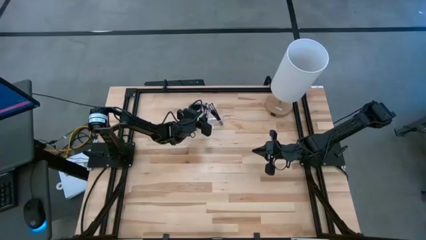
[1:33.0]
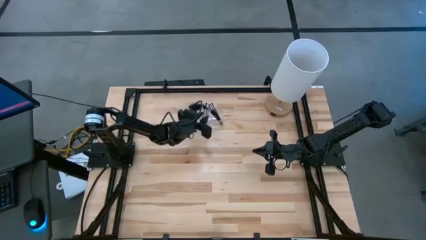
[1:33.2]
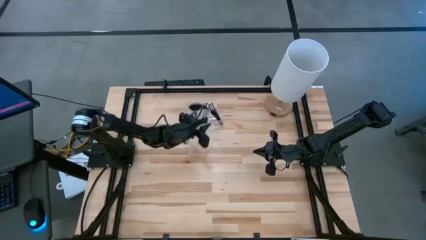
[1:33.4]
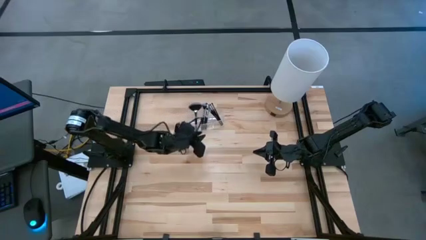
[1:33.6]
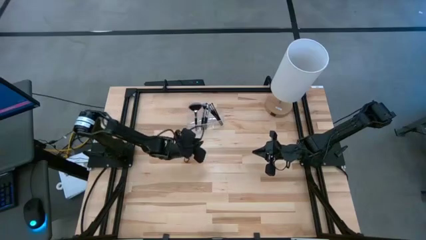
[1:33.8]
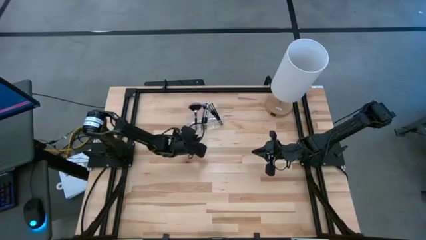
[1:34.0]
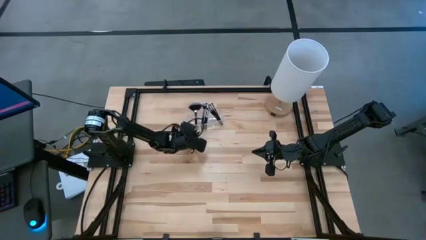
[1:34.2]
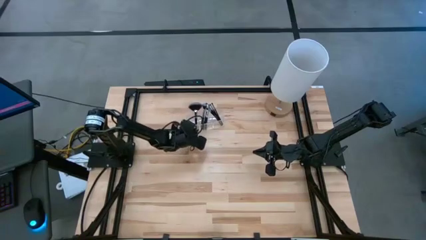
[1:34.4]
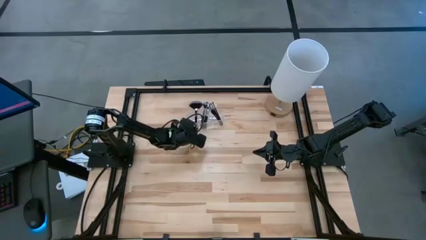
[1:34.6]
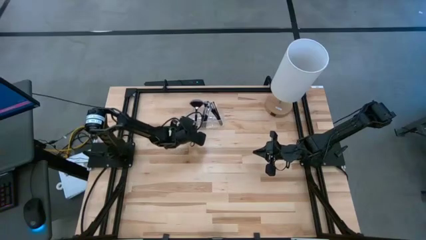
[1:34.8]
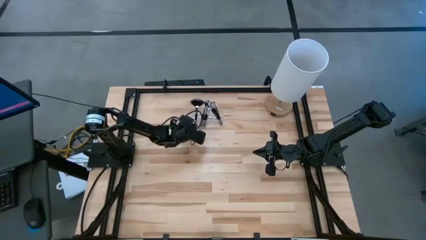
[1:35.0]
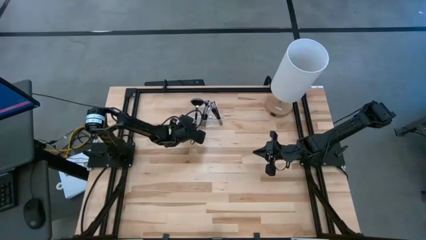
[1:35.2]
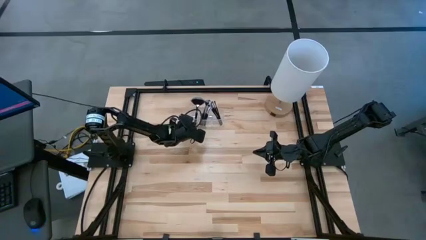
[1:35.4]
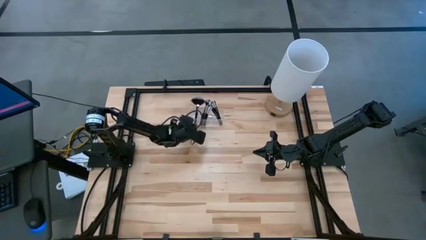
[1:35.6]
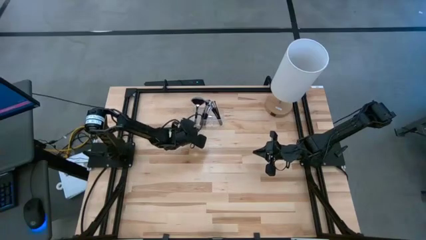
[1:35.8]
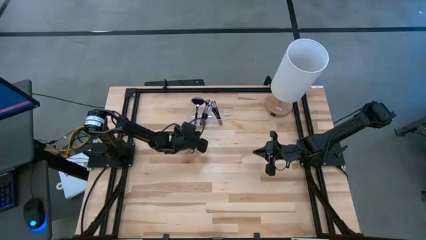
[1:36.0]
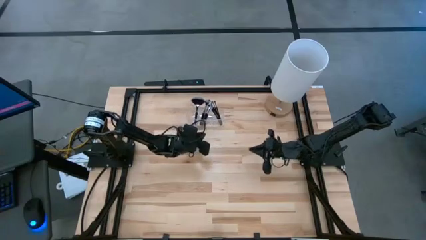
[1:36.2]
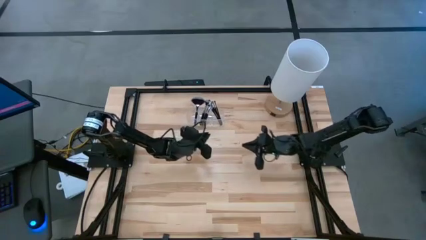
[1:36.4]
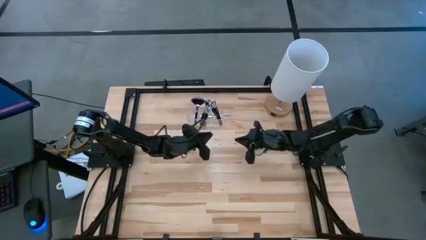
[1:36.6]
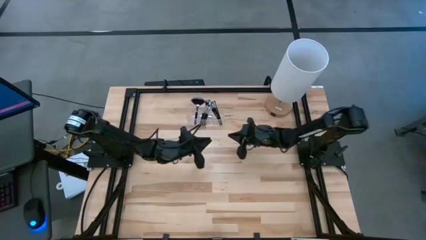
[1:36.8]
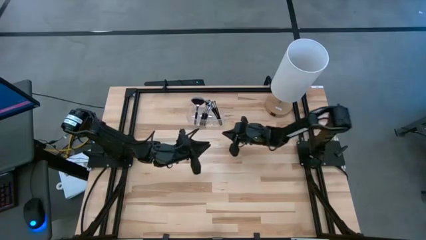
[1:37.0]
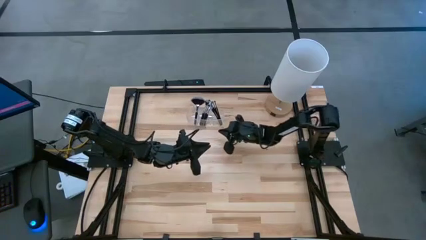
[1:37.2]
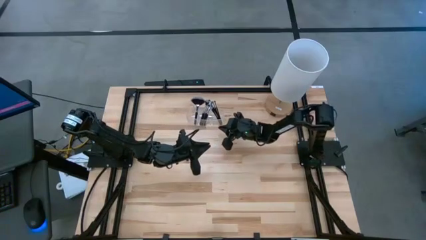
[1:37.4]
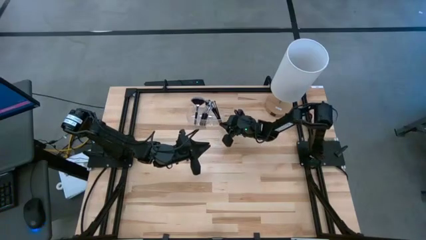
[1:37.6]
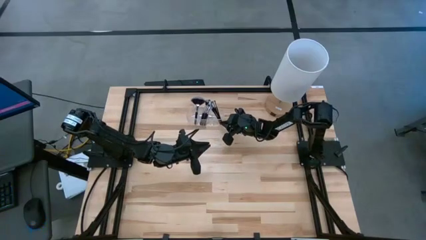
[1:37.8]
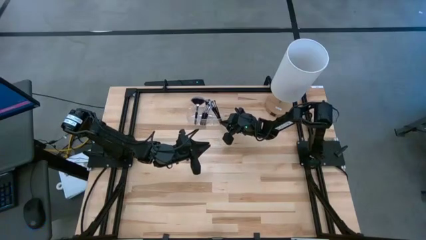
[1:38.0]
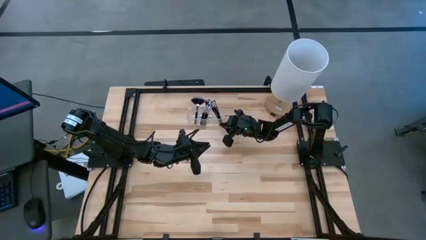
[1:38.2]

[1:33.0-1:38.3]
Task: Pick & Place Makeup Supplies
Adjust the transparent organizer

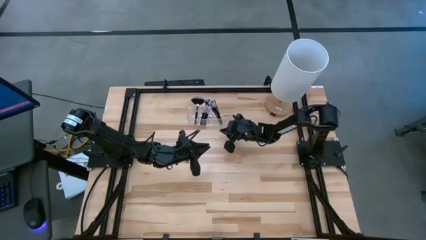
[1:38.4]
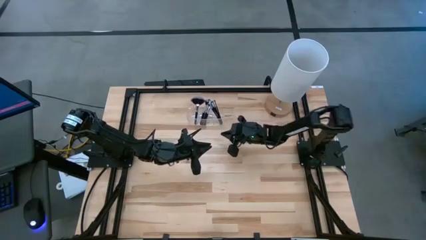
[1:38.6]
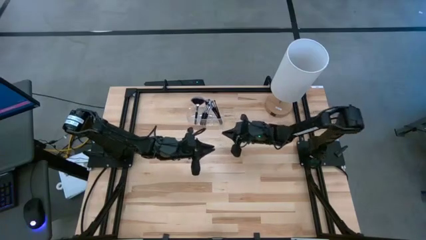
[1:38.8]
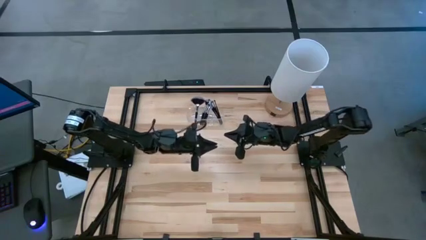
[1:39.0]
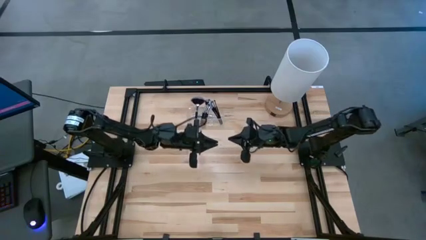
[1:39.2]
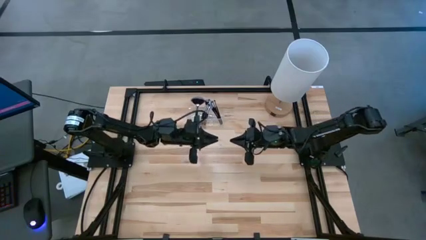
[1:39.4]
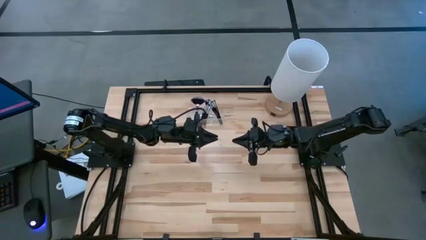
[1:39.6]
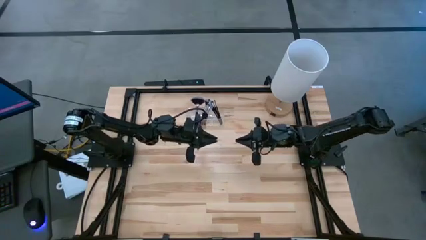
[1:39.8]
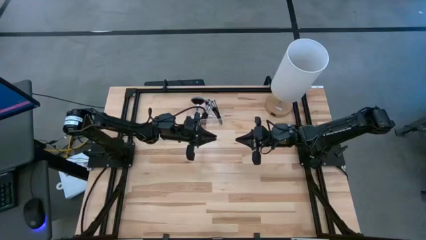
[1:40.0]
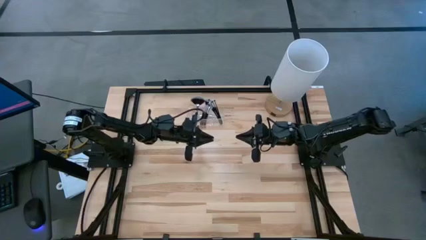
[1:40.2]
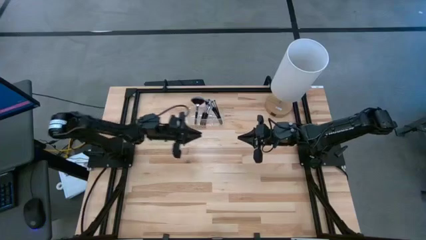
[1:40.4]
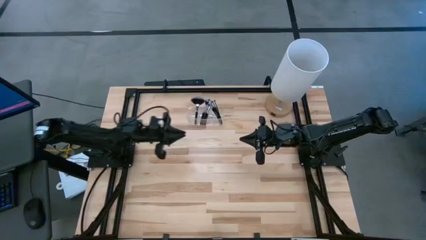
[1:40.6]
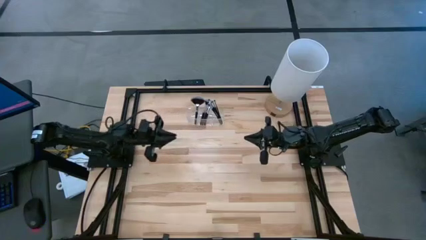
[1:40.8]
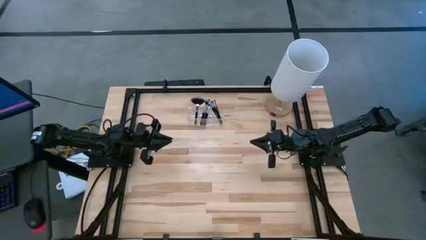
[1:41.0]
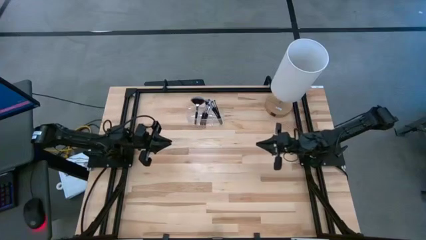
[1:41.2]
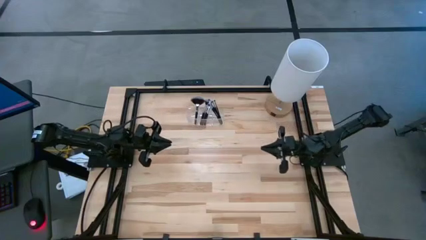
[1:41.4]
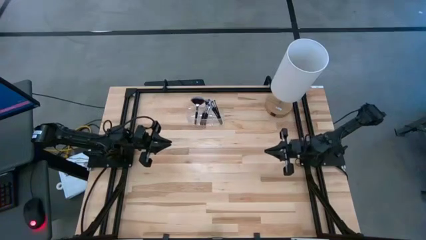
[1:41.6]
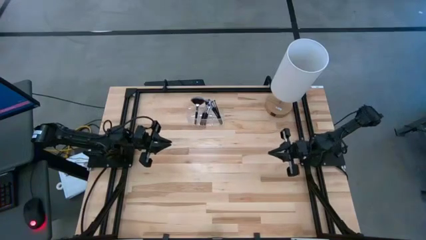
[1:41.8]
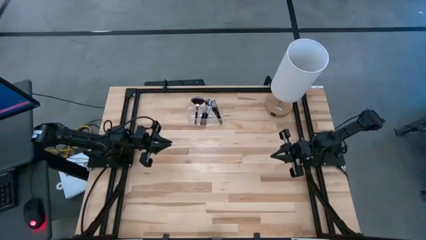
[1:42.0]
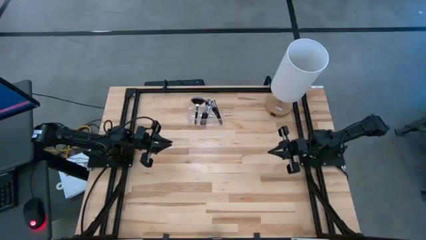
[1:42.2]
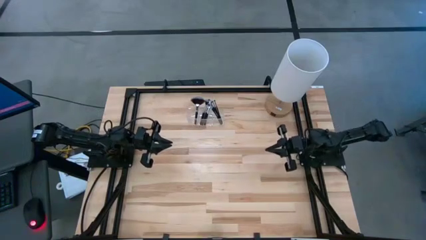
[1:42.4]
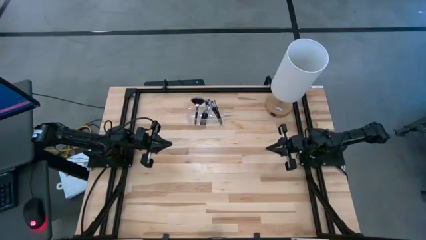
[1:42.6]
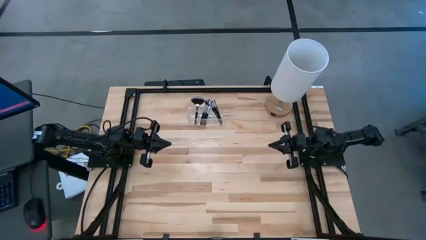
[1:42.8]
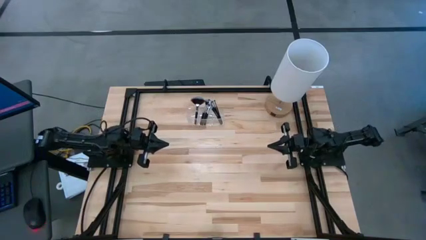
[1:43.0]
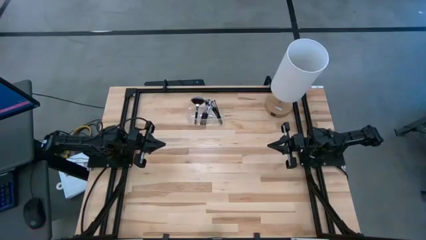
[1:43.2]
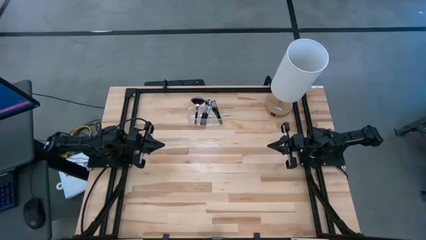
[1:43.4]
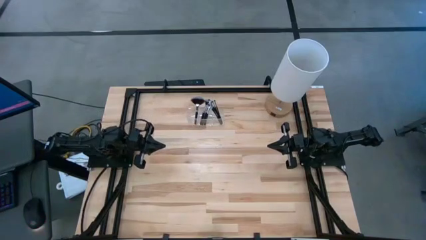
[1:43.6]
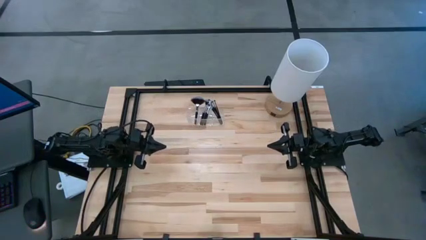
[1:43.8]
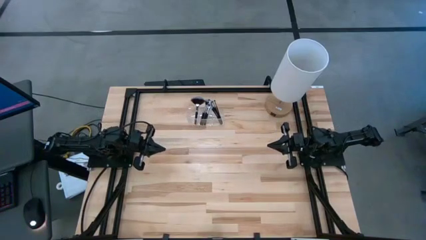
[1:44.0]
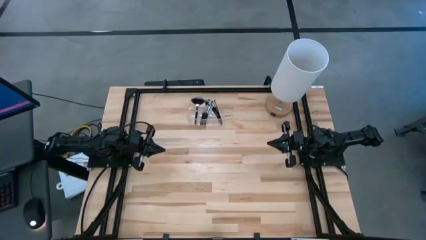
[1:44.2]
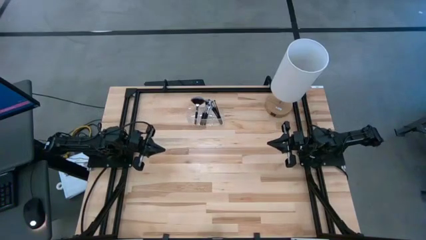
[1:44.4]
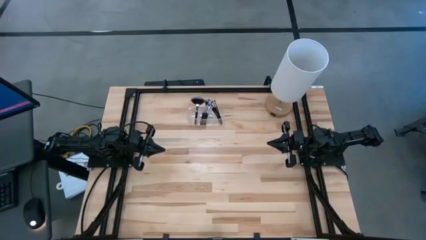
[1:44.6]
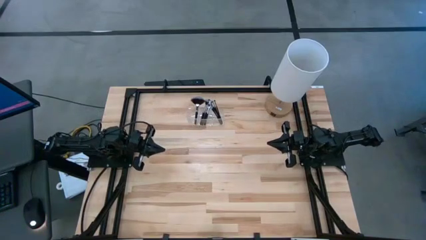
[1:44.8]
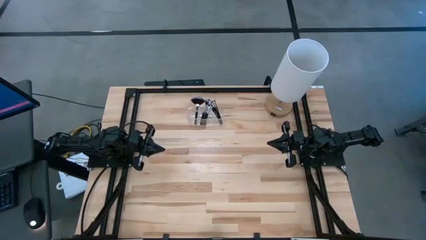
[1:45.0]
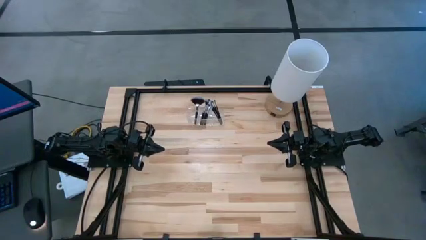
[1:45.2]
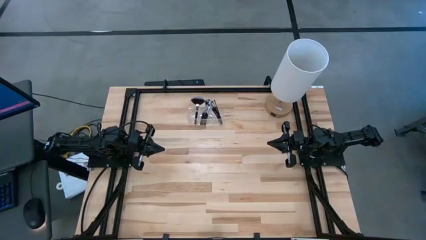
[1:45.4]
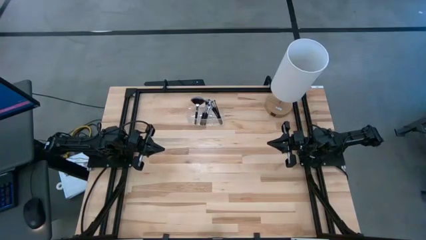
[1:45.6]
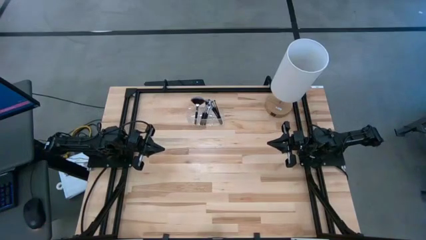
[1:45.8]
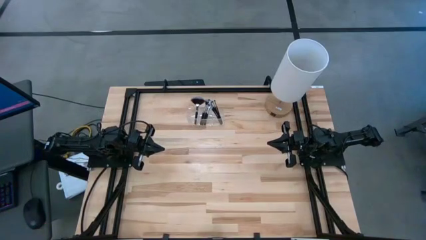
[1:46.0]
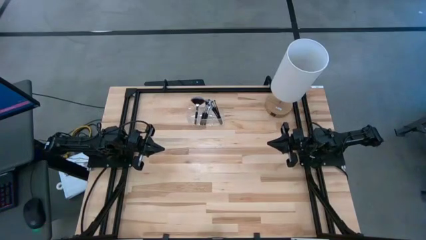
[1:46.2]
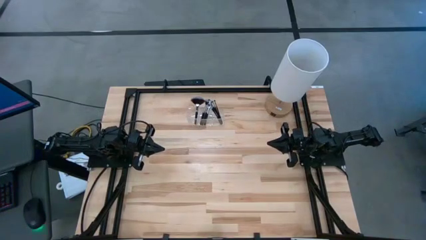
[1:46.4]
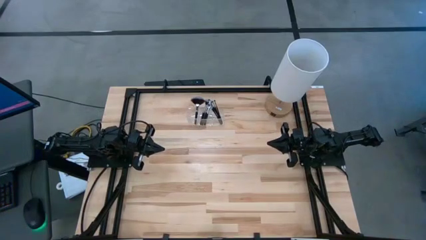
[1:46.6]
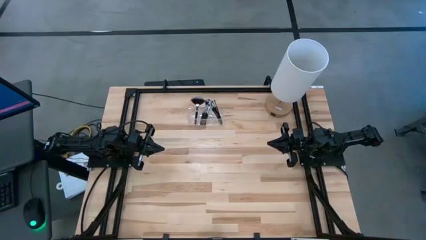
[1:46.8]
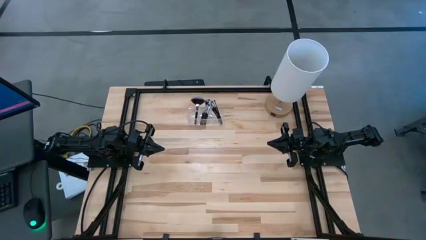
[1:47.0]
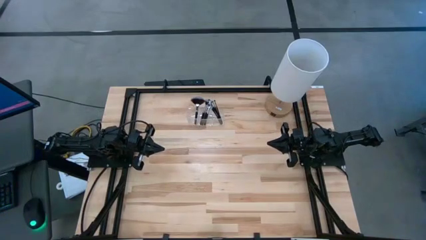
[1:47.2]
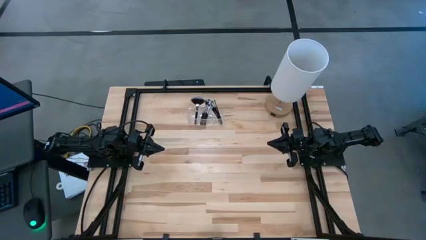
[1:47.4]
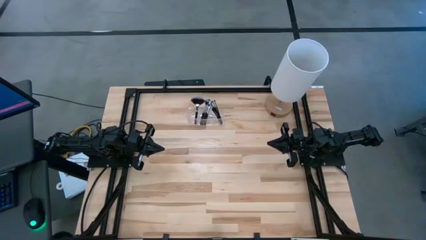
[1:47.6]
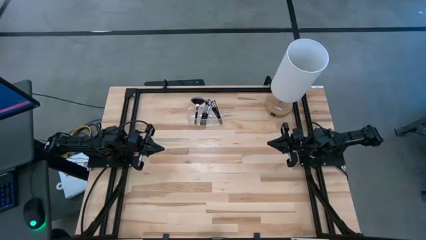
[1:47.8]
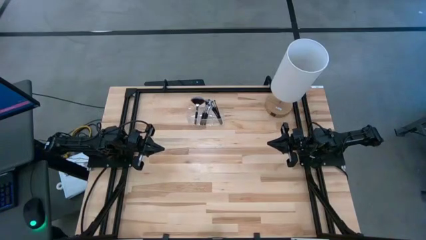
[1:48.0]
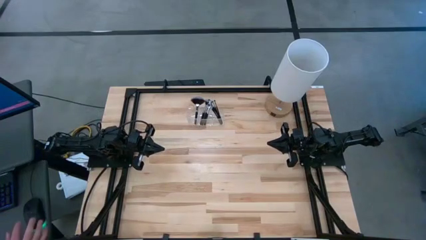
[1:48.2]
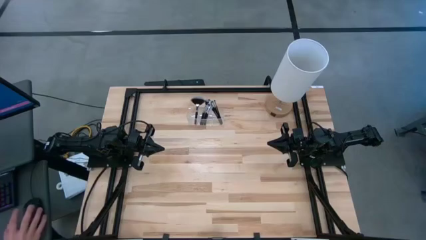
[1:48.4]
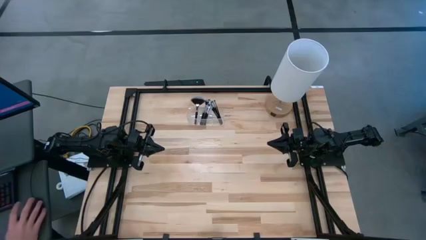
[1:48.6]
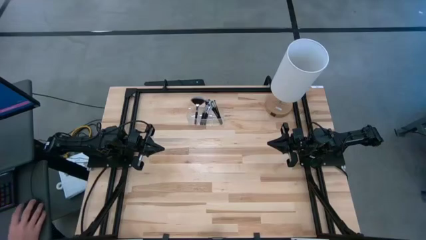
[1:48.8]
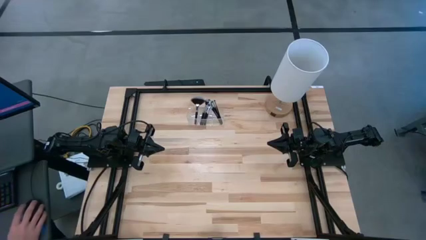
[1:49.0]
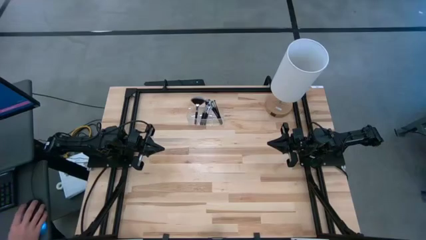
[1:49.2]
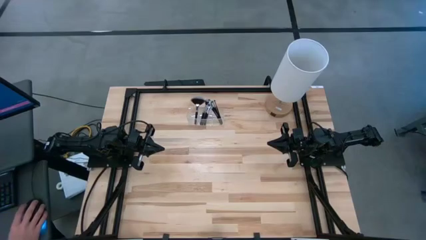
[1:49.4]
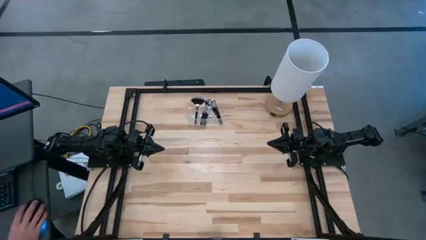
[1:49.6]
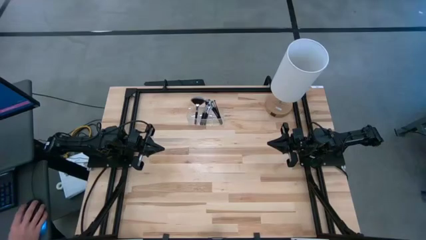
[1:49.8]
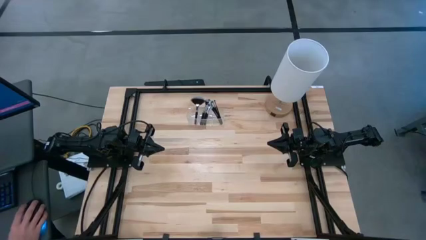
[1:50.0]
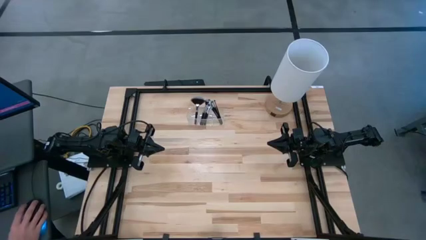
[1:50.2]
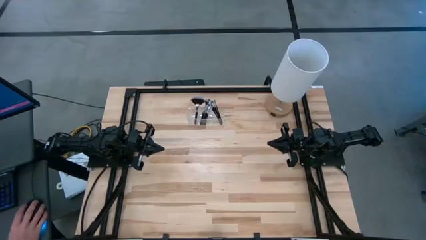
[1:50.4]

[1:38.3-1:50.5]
Return to Home Position

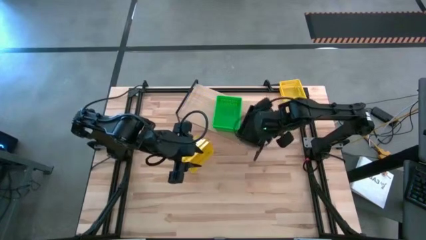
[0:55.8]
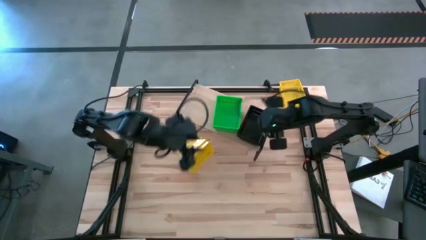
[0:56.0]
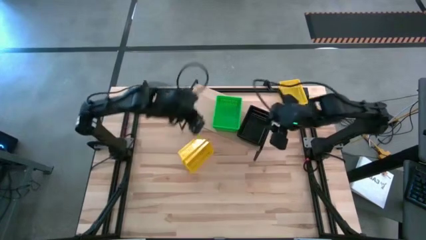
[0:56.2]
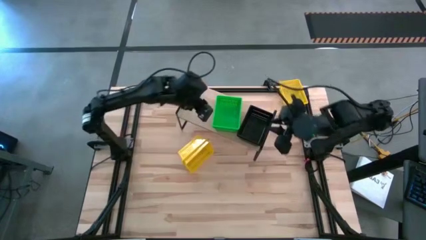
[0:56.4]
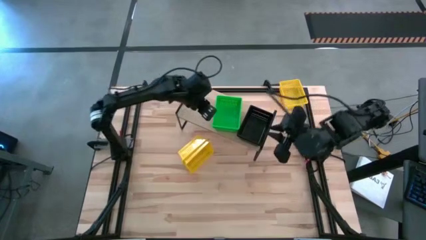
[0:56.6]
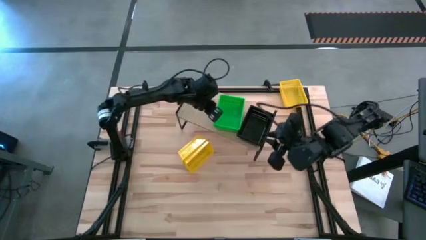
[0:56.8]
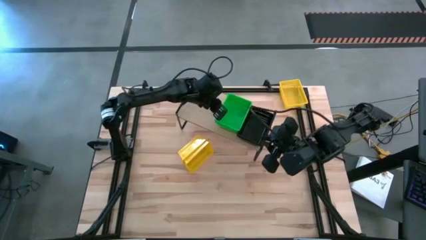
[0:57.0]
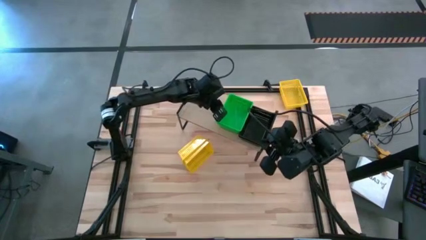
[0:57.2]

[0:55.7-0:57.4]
Task: Stack baskets on shelf by color
Adjust the stacked green bins on the shelf
